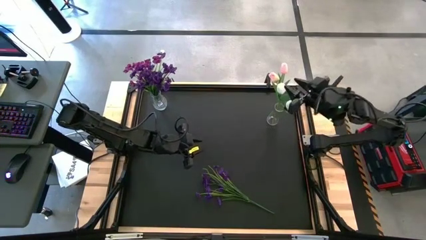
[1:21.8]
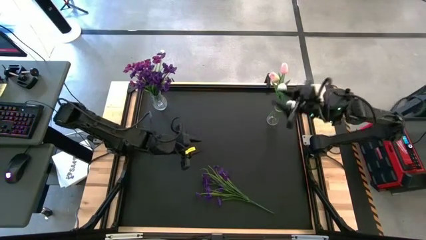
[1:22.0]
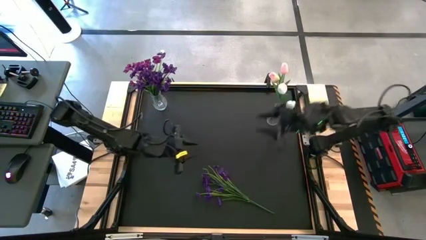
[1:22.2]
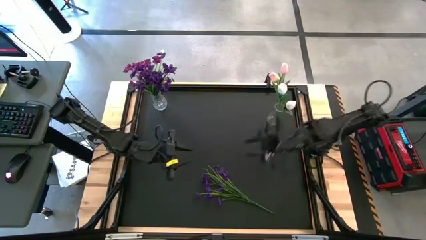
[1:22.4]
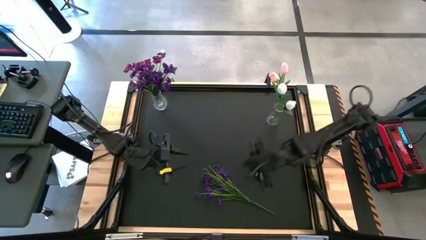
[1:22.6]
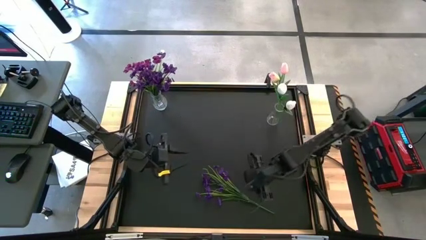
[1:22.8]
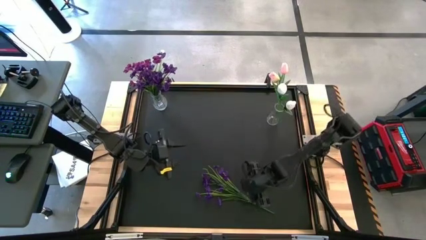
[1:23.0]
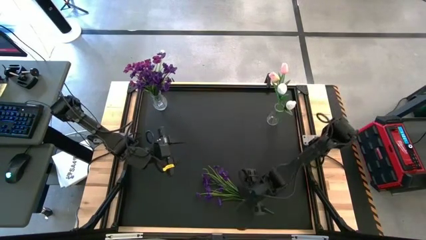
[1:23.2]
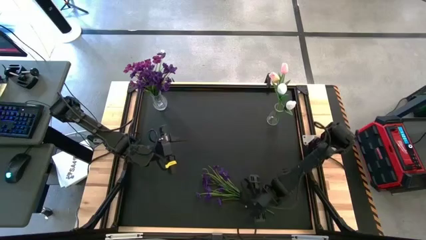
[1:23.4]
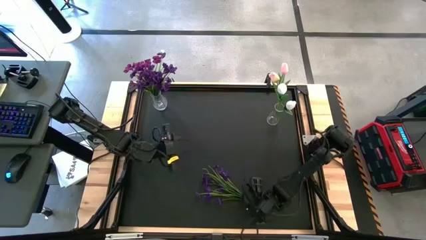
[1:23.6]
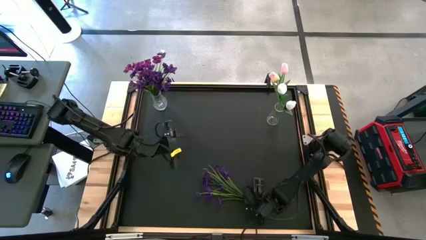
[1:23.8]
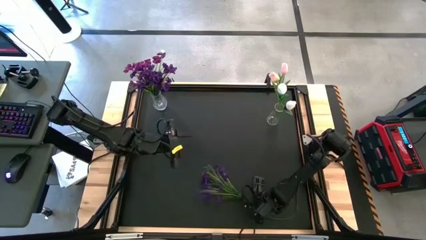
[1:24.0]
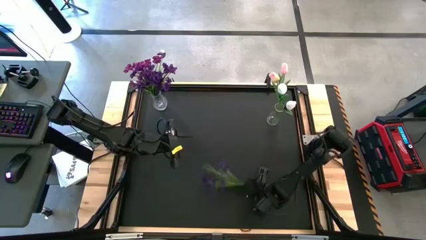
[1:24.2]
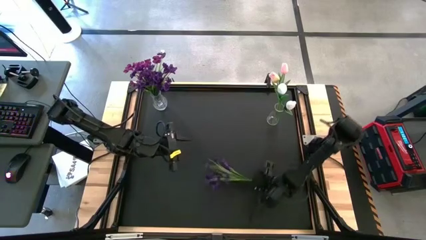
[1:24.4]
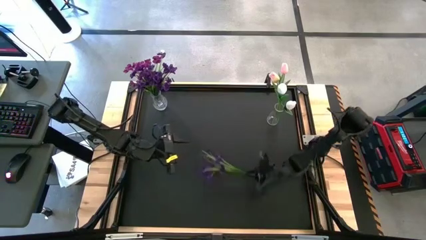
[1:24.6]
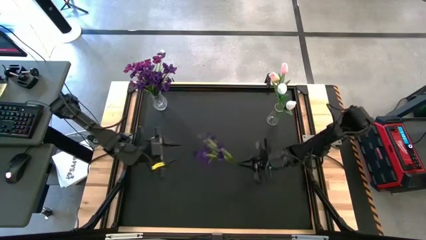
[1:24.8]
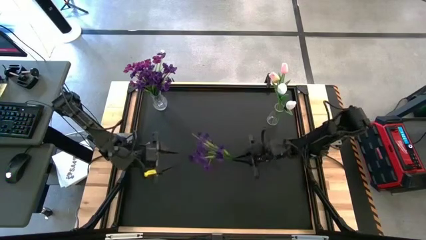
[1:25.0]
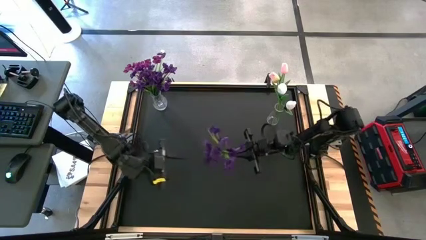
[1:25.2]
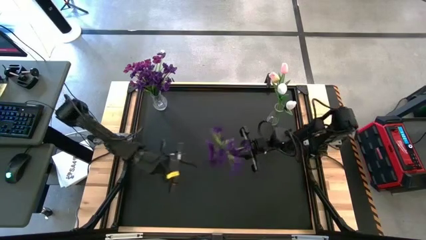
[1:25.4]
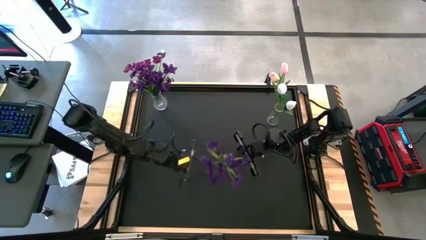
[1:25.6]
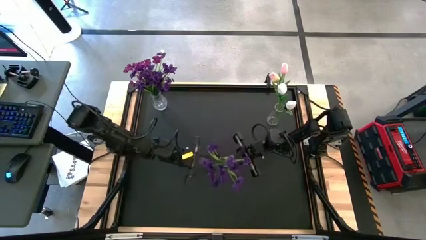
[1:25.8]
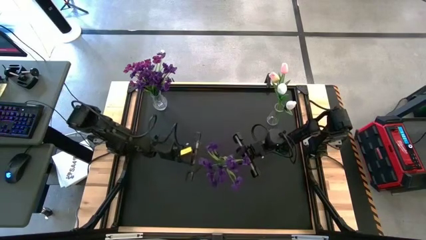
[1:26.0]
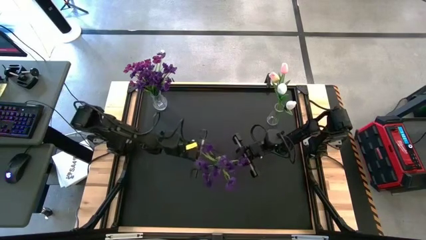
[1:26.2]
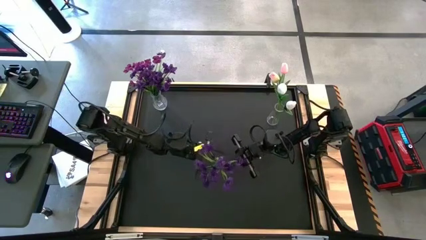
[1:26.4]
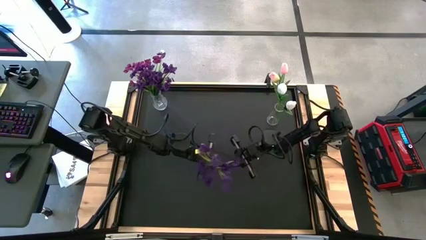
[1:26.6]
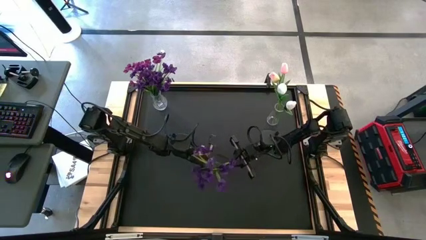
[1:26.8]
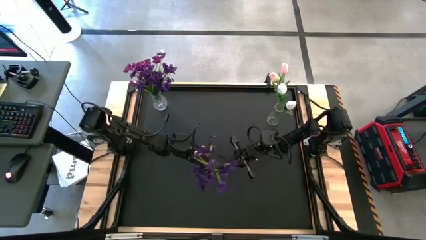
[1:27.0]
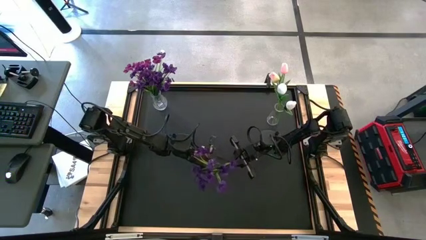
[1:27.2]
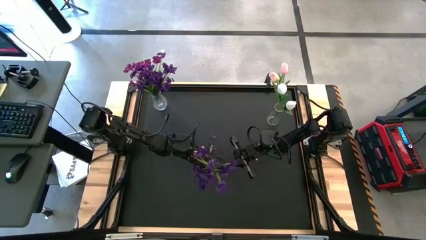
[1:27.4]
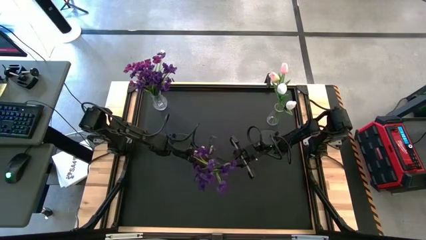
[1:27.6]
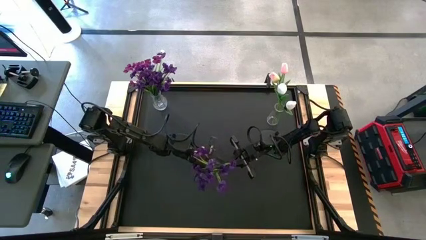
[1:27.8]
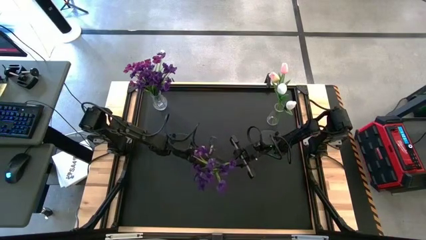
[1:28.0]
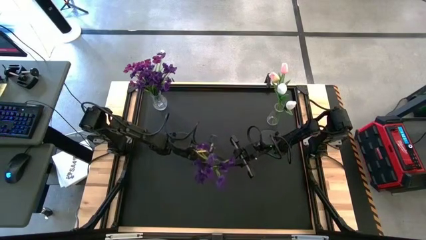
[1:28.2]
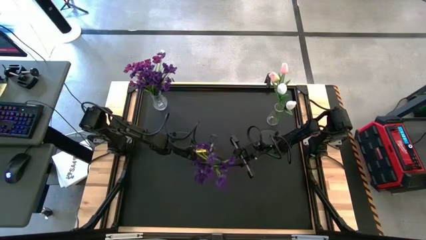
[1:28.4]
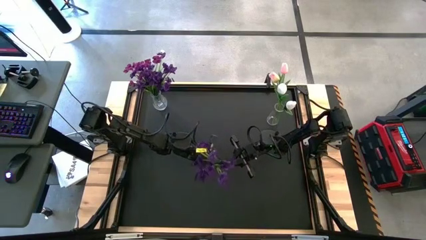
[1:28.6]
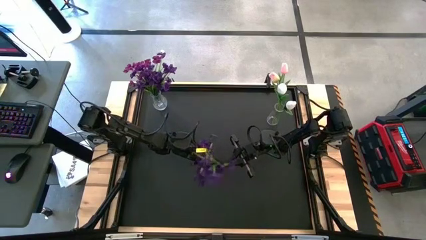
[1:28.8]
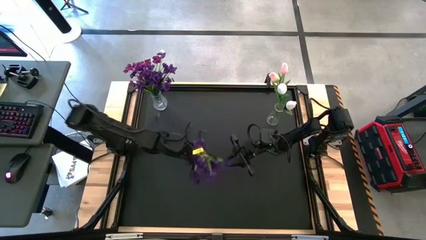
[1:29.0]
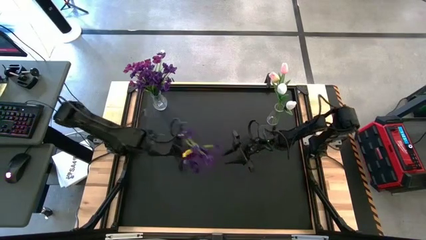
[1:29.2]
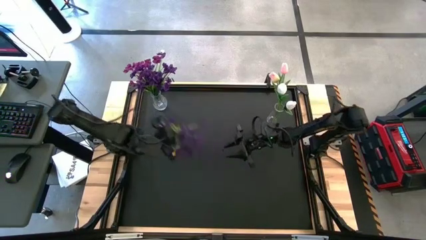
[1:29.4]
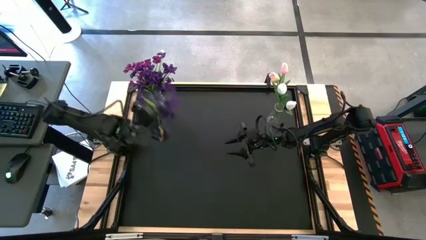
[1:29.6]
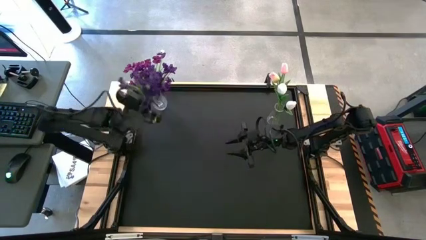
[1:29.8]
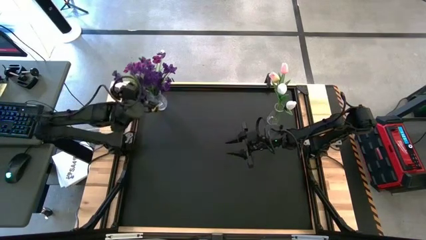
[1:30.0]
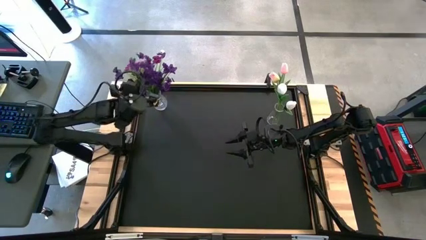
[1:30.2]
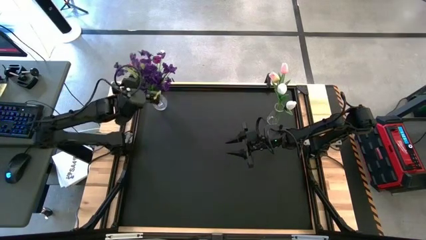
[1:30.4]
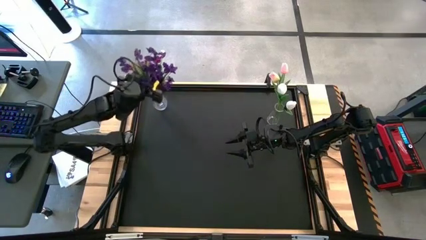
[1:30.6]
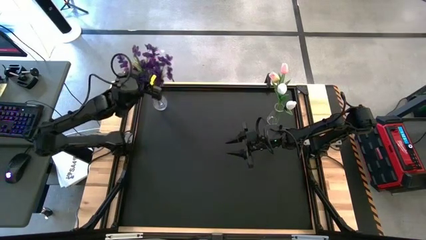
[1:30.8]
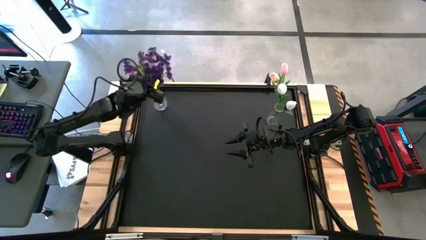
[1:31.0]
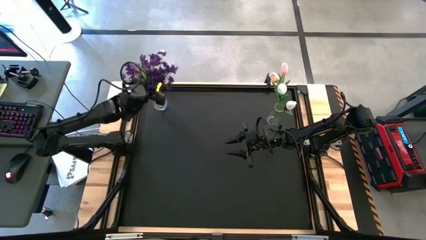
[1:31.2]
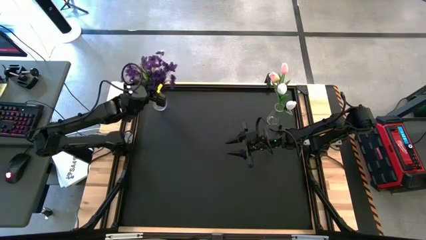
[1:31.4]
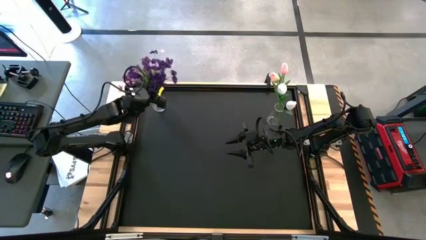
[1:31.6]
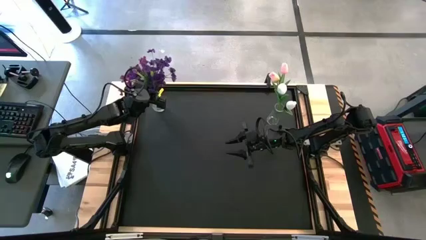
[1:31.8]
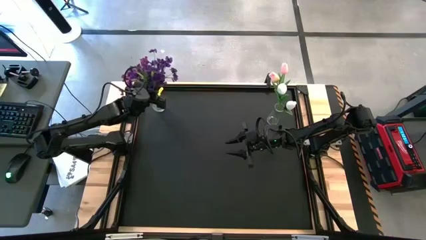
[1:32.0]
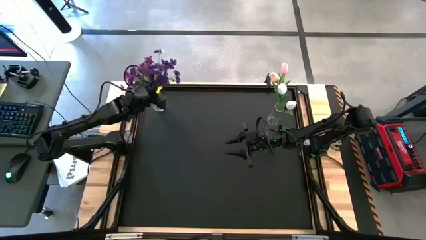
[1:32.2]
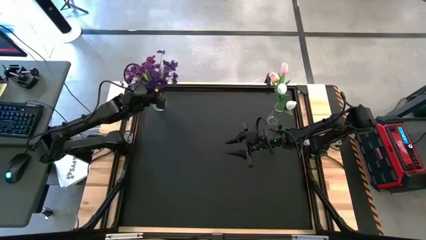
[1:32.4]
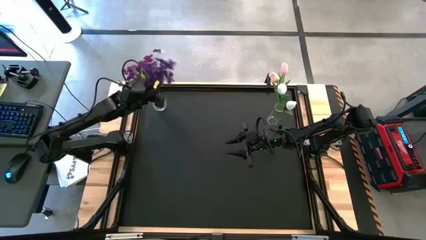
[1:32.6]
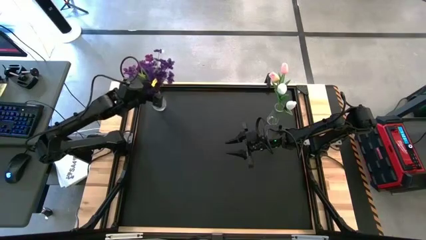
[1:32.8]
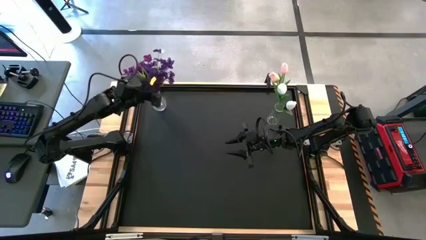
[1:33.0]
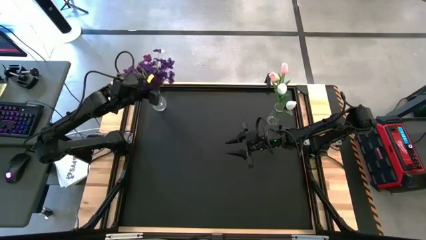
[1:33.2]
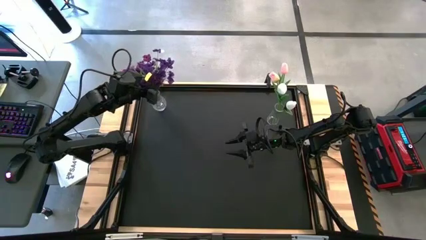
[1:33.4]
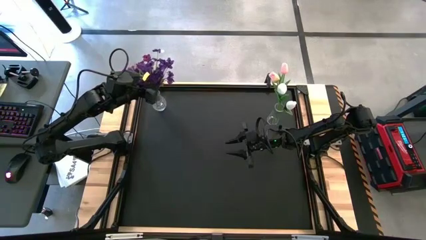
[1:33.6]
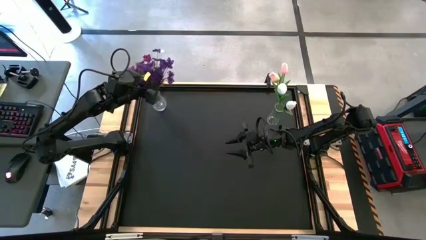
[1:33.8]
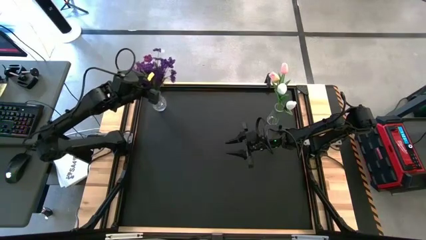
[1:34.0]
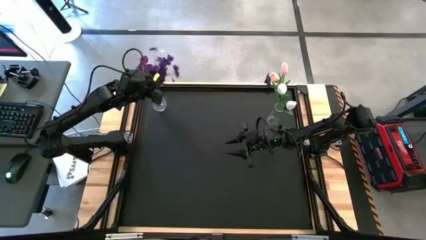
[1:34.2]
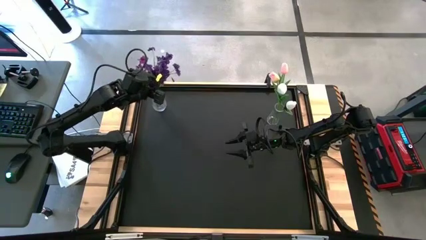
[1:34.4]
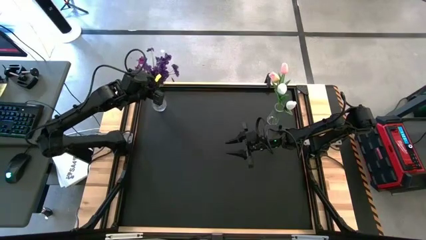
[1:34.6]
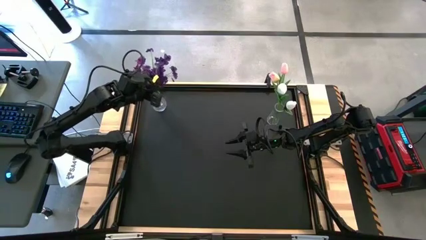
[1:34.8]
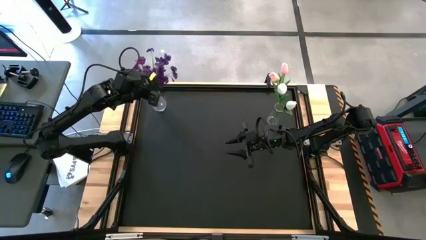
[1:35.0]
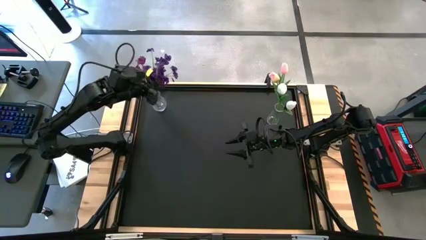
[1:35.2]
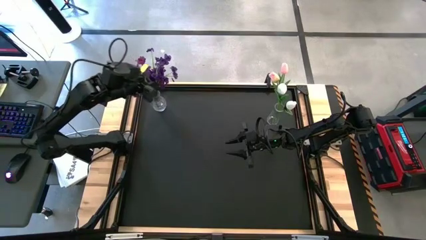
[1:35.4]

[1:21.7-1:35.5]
Task: Sort flowers into vase by color
Put the purple flowers into the left transparent vase

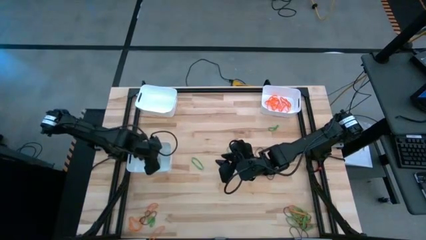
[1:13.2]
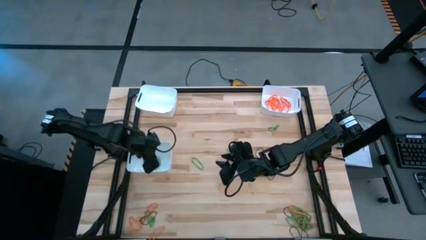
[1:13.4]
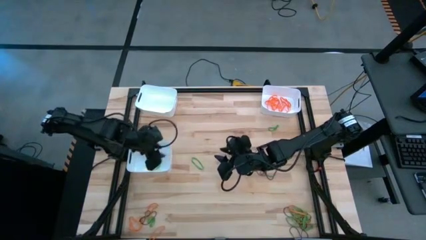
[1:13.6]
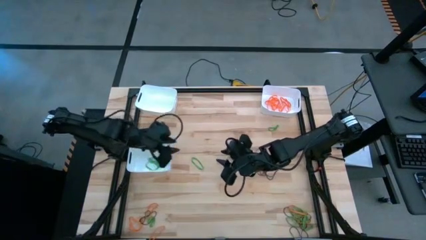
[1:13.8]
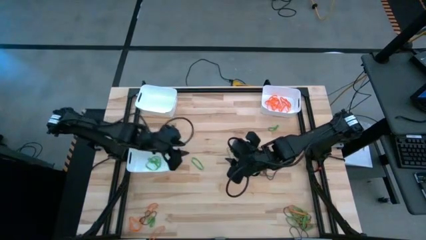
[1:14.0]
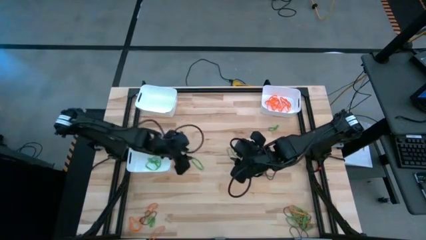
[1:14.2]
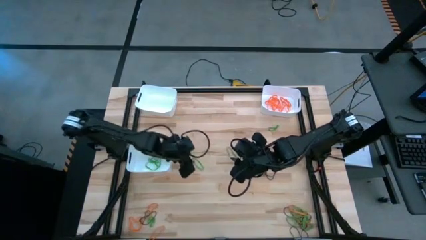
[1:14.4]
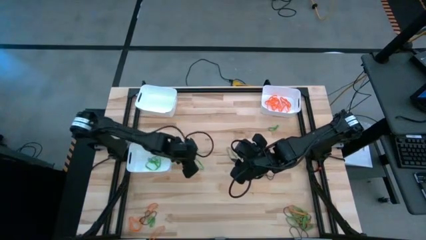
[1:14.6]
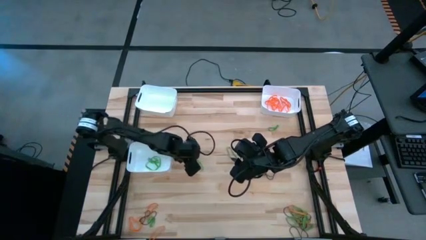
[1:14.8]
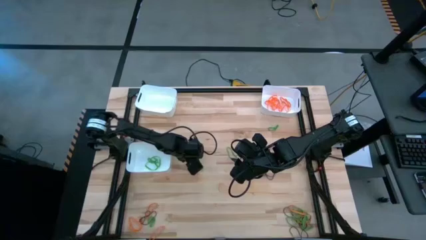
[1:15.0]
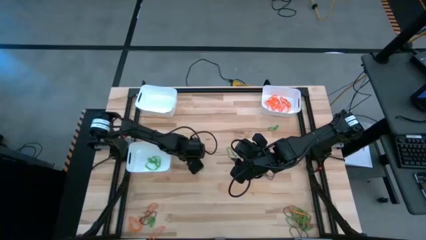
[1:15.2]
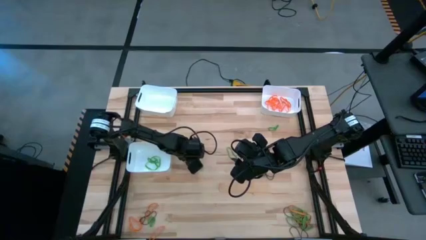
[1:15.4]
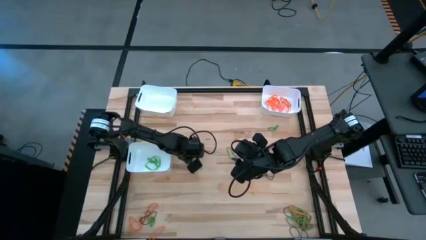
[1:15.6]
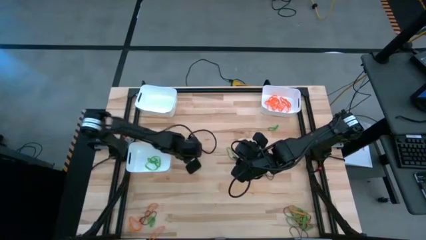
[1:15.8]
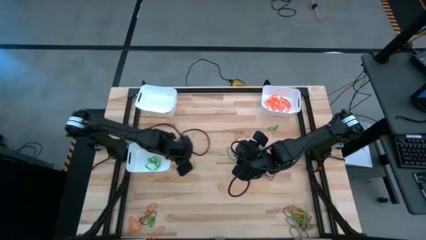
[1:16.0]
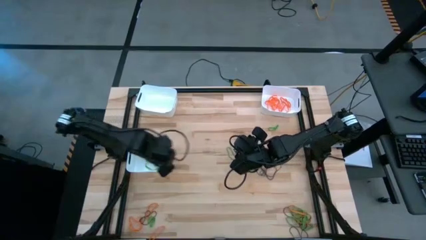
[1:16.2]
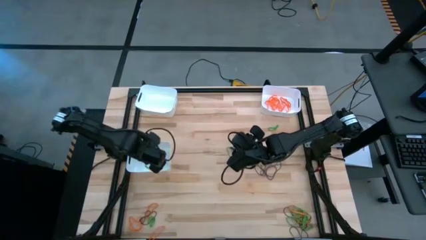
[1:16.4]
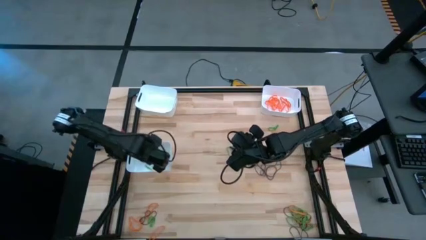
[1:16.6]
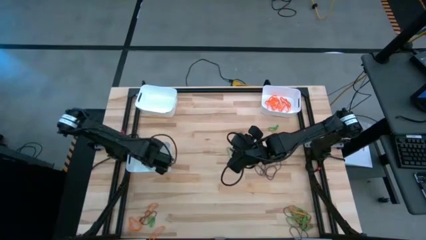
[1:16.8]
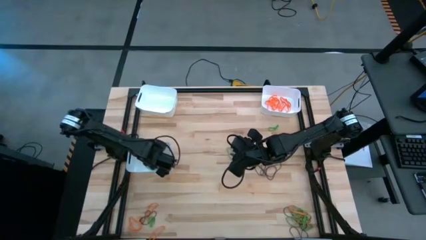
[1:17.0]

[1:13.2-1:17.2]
Task: Sort rubber bands into baskets
Put the green rubber band into the bottom white bin
